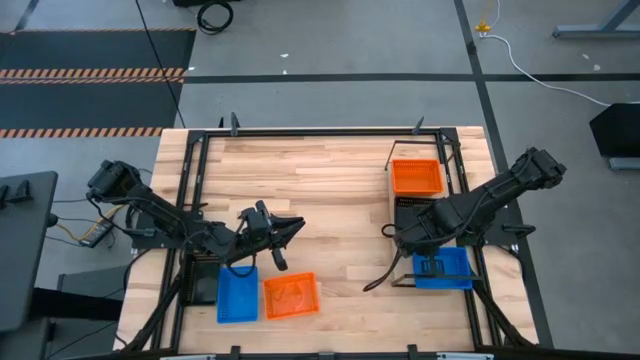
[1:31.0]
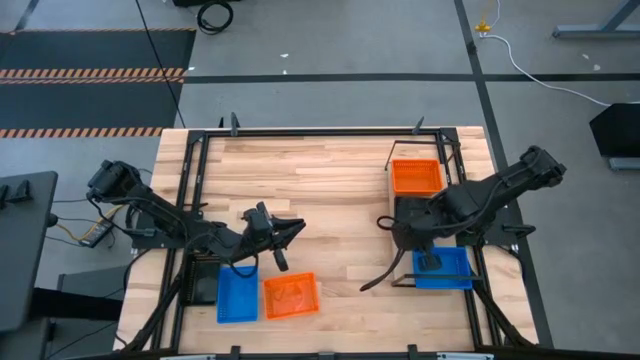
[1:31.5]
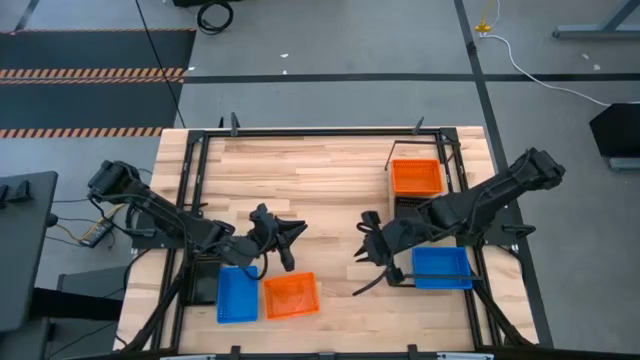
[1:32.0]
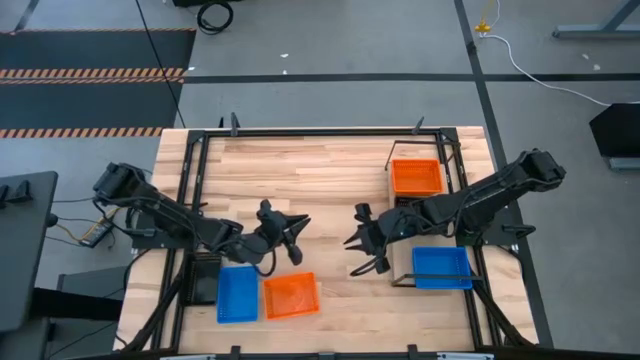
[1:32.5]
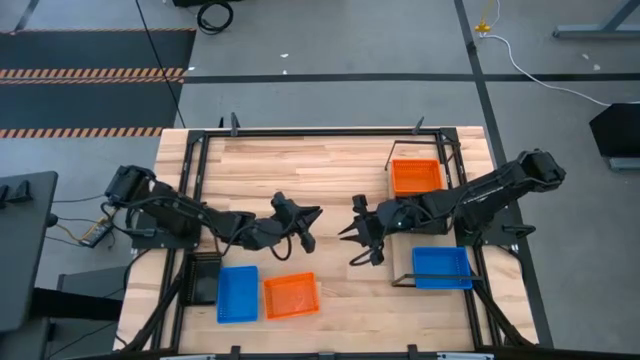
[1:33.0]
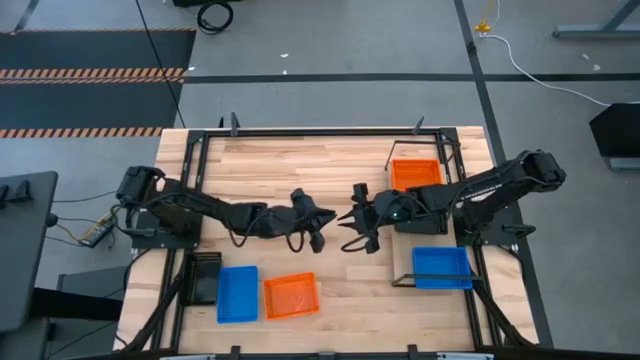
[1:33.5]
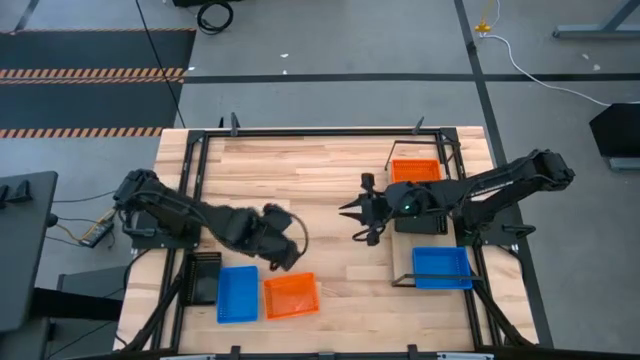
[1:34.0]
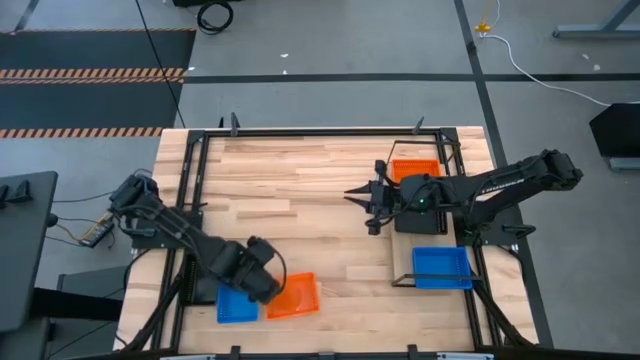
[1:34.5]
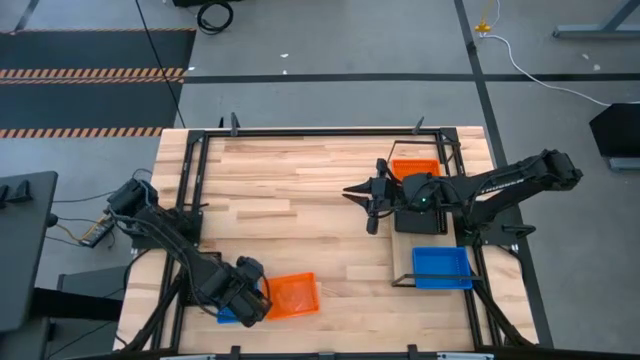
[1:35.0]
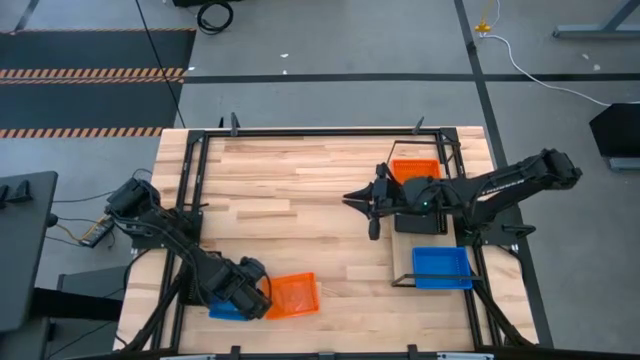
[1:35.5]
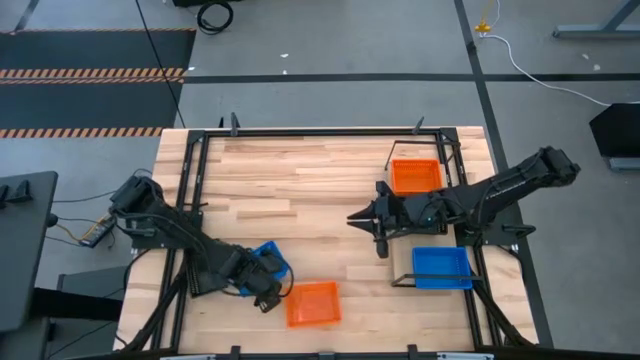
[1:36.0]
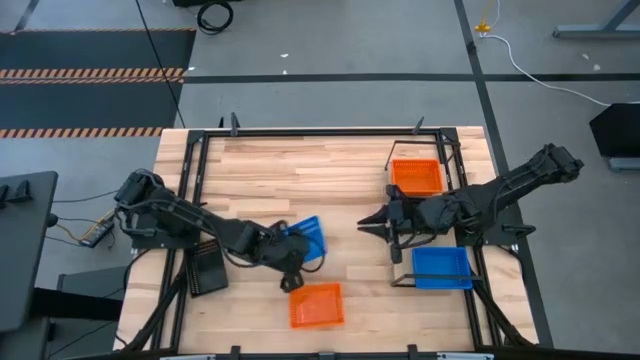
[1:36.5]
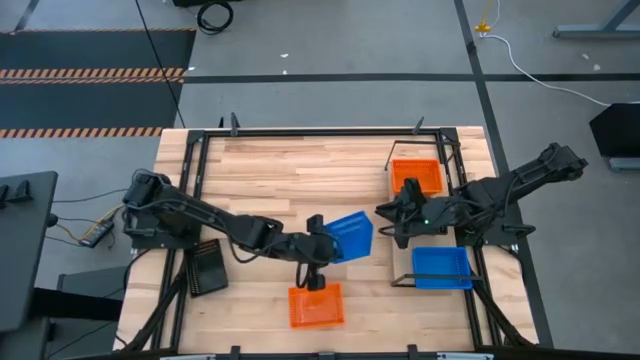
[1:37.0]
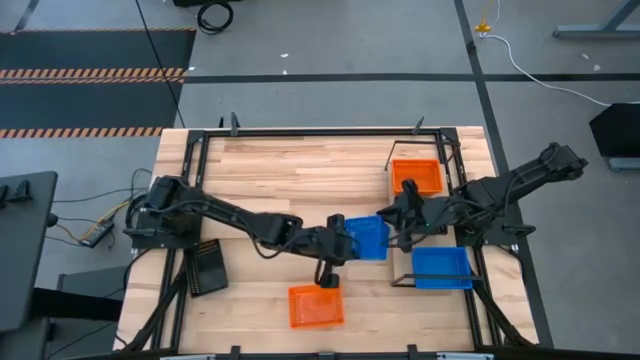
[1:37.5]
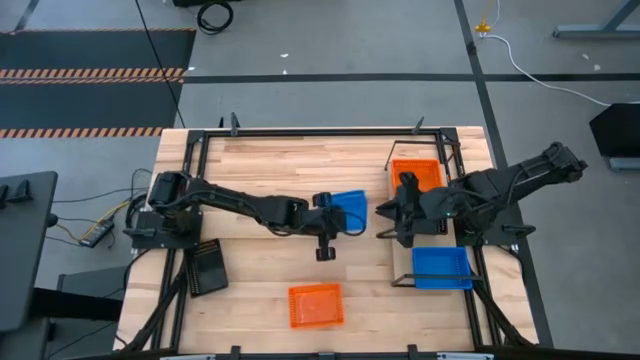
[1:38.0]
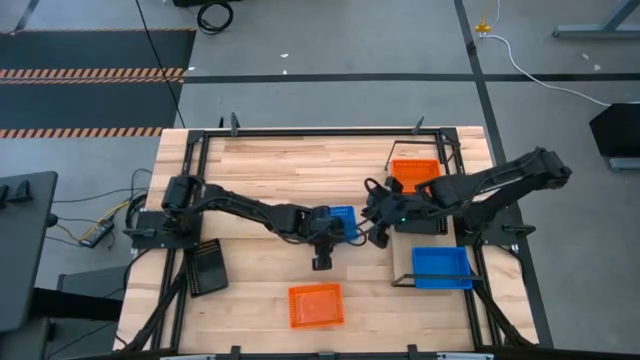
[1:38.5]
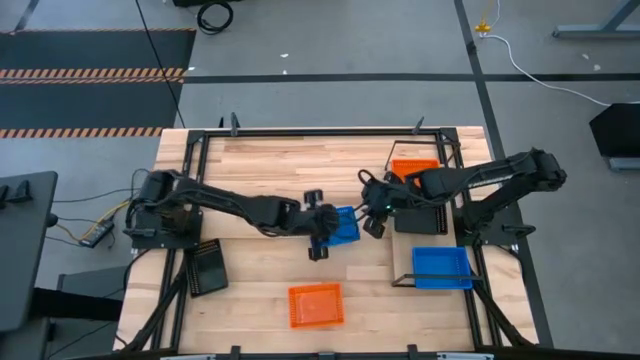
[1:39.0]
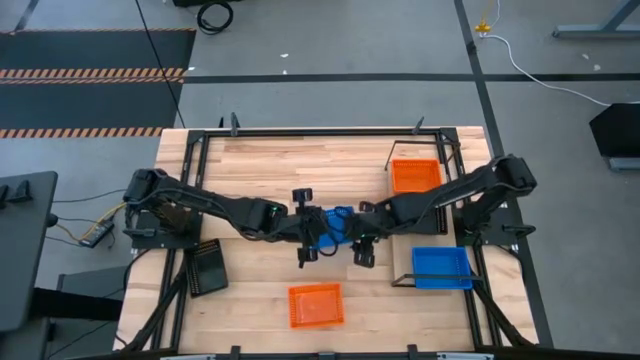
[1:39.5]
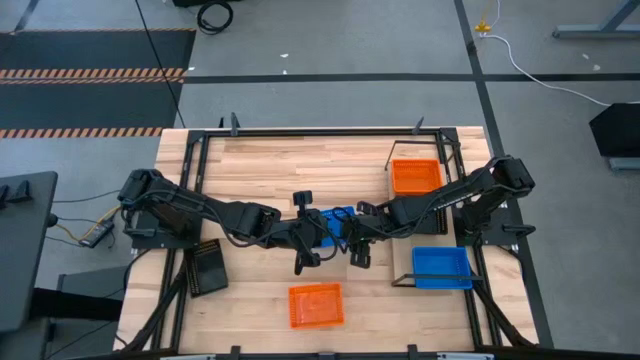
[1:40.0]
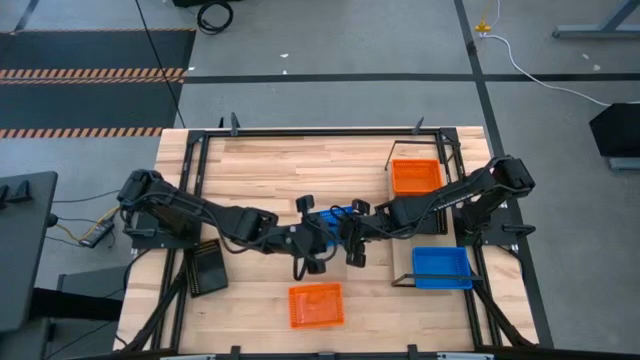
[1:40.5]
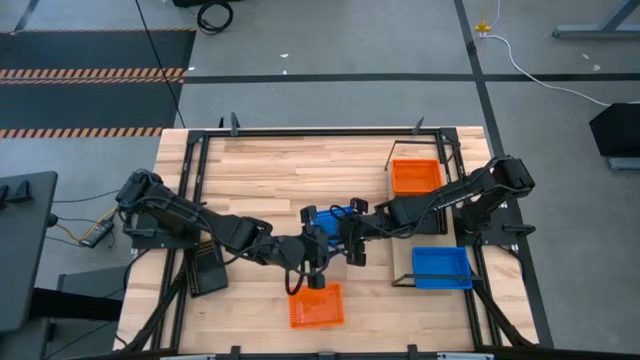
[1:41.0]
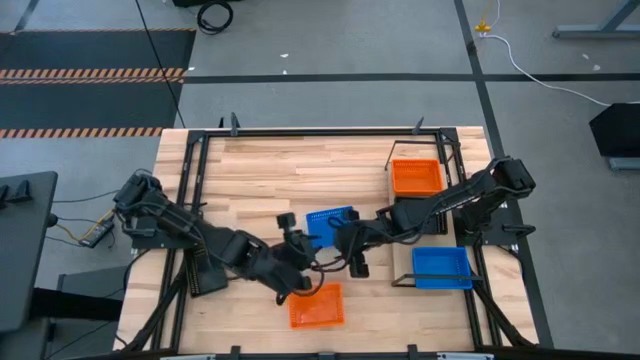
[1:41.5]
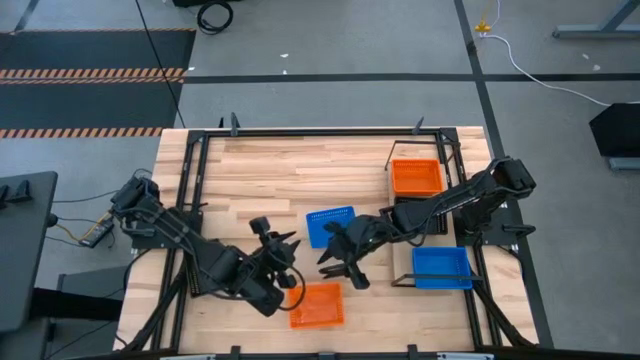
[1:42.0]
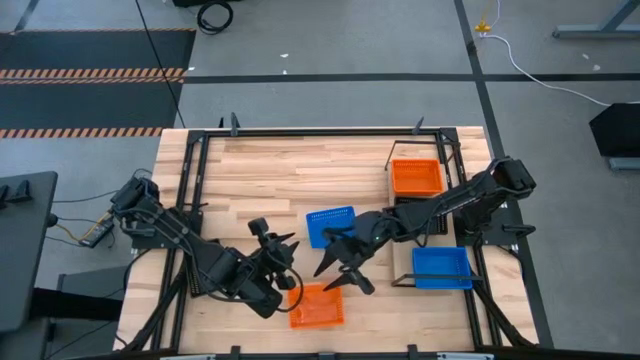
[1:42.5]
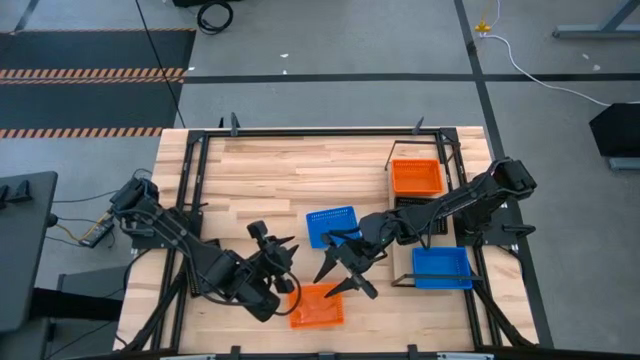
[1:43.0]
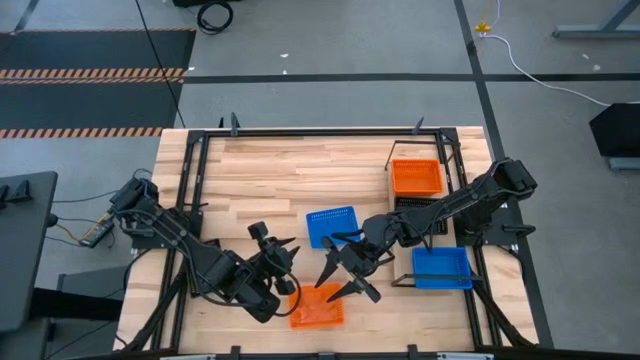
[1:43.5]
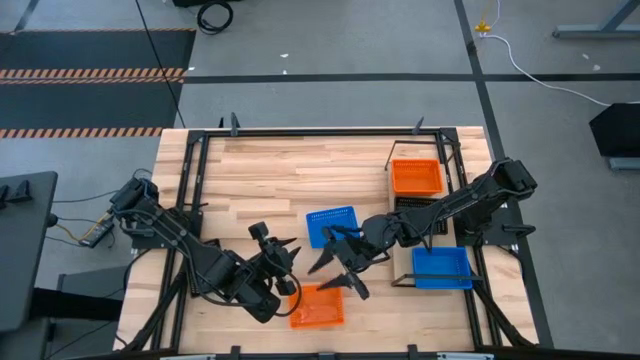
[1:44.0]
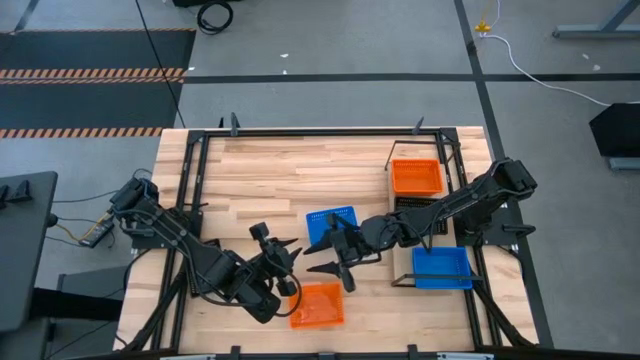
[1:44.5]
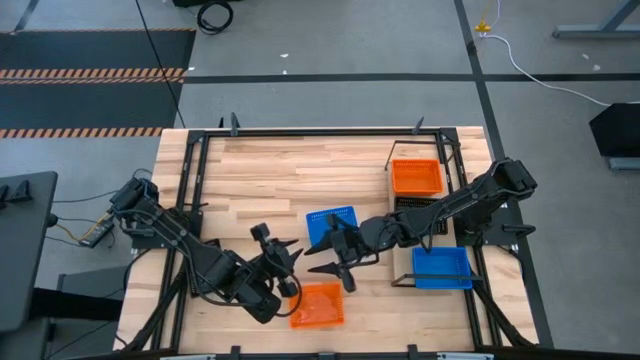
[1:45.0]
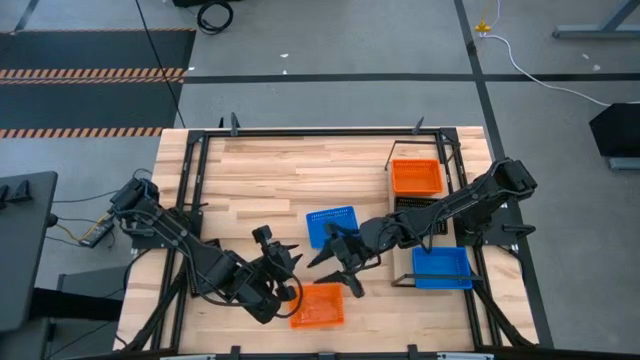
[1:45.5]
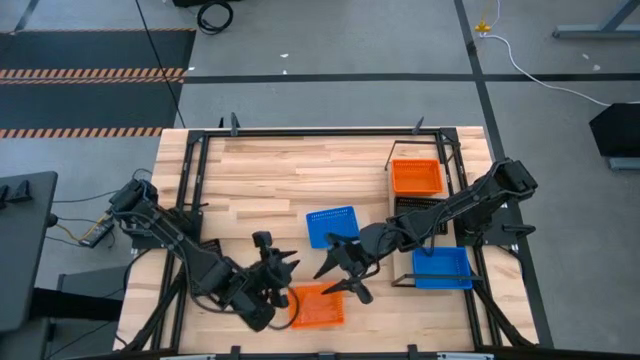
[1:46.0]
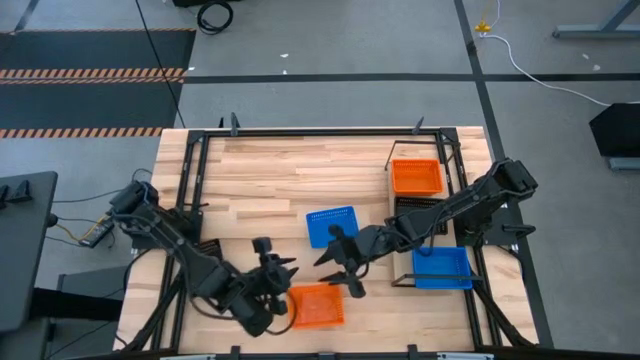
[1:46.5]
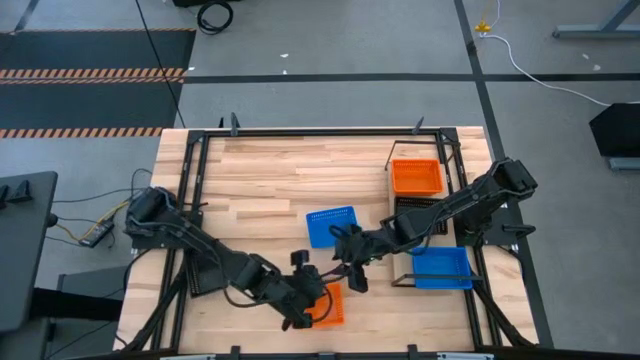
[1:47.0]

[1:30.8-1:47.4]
Task: Stack baskets on shelf by color
Stack the blue bin on top of the blue bin on the shelf
